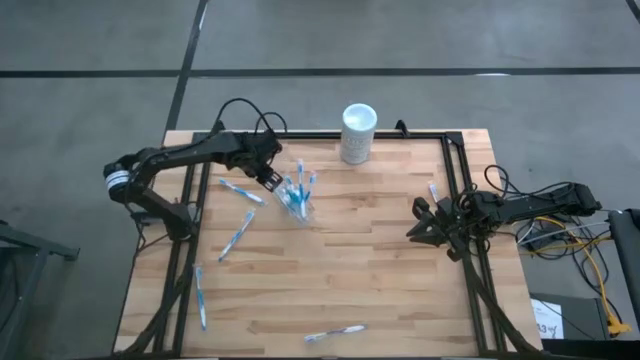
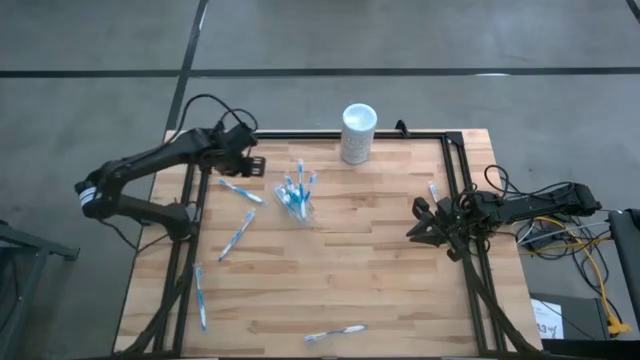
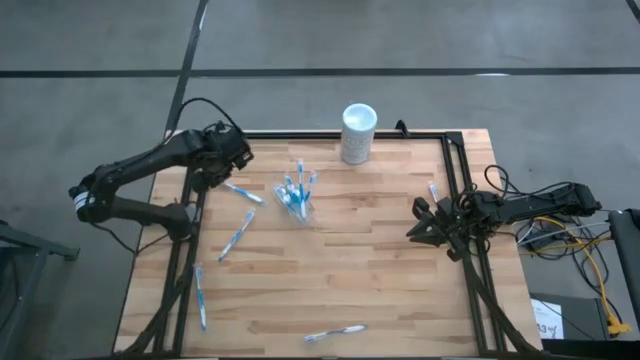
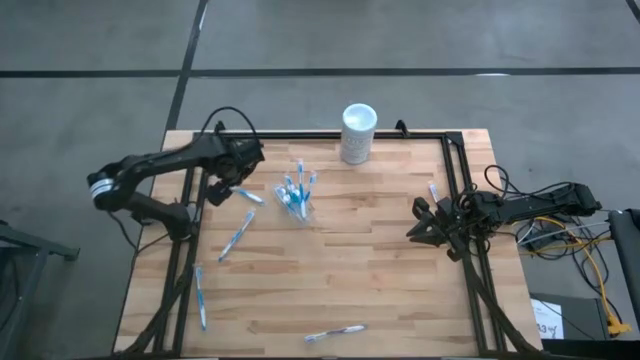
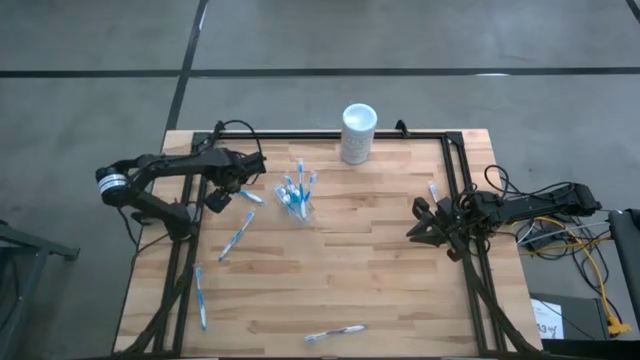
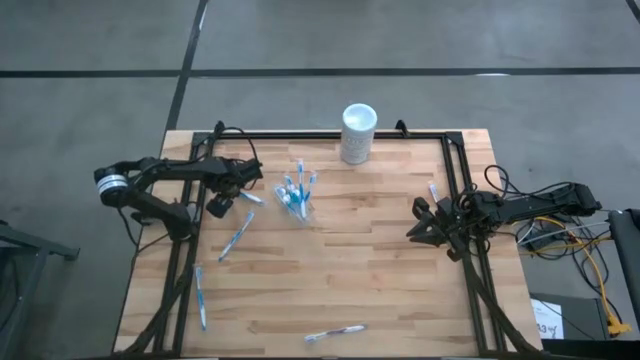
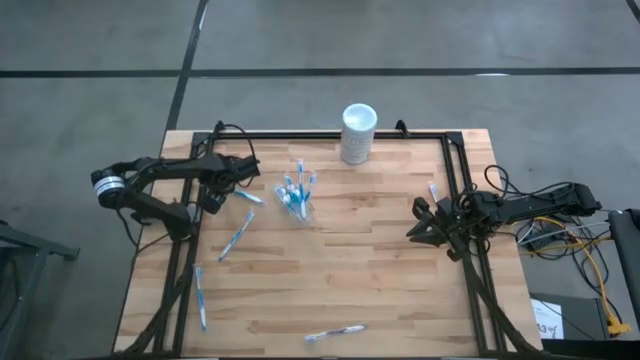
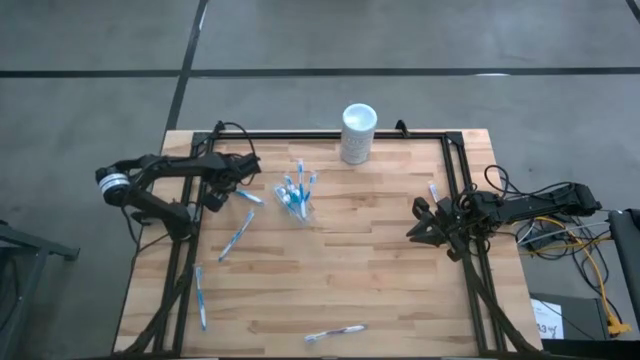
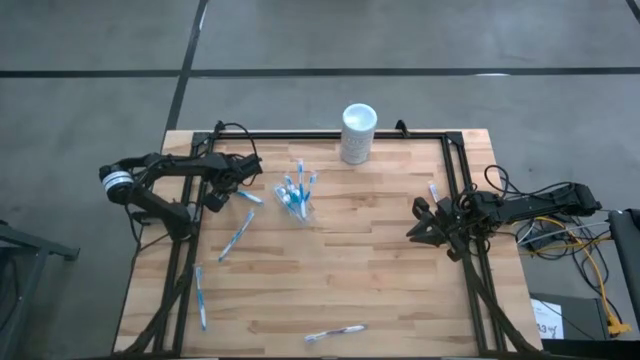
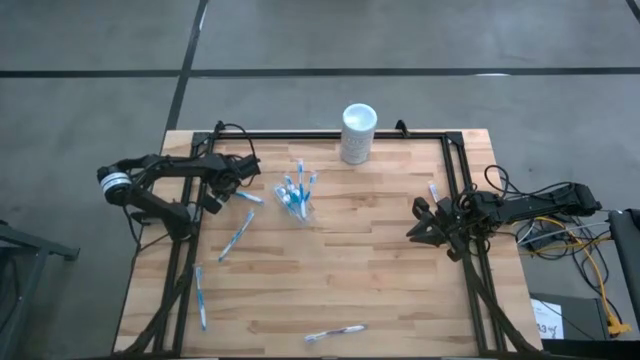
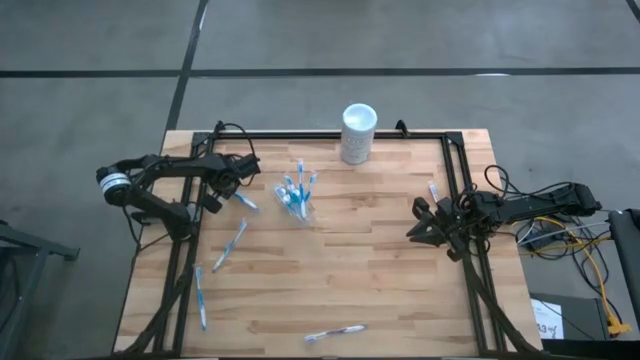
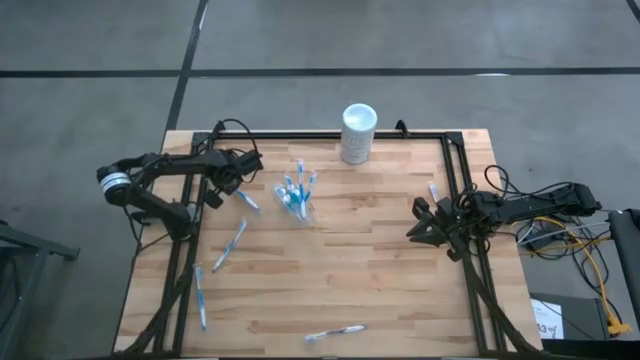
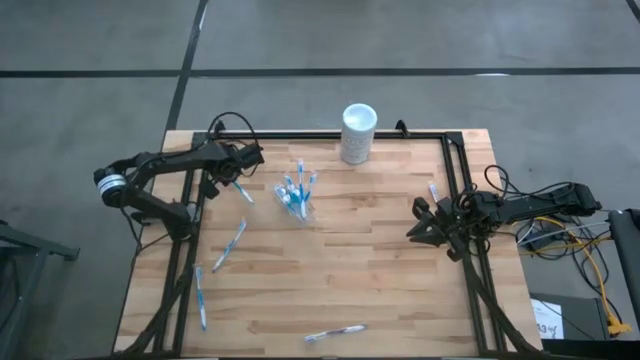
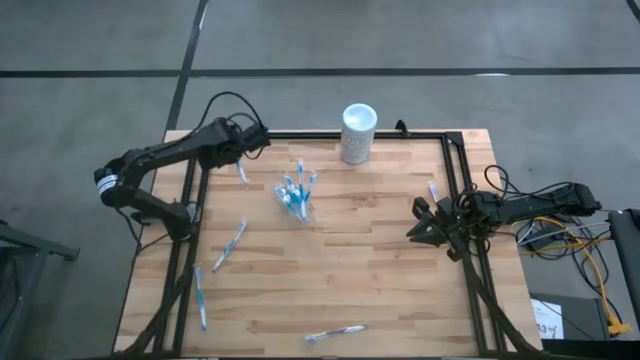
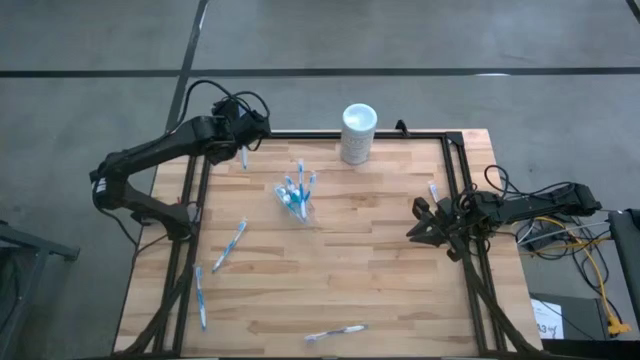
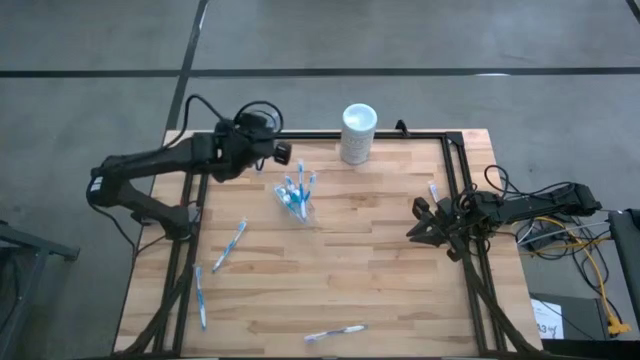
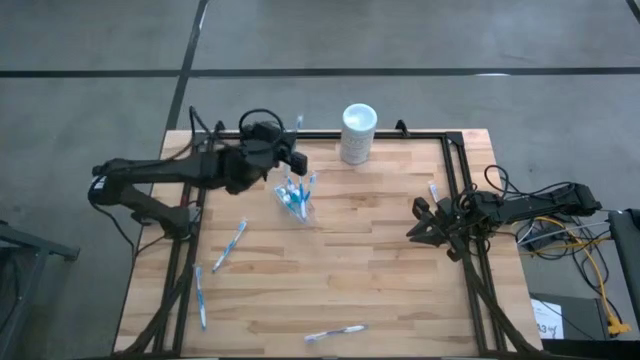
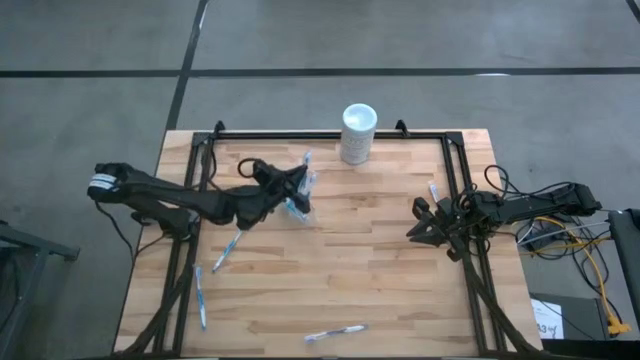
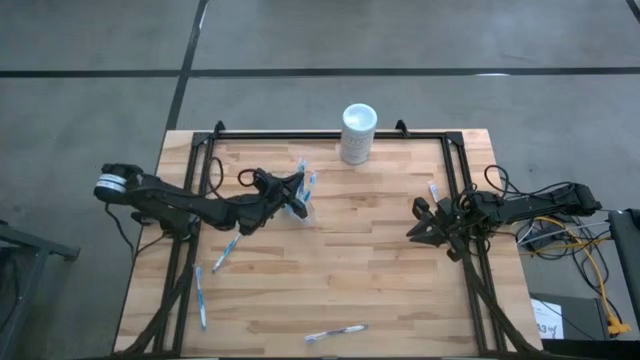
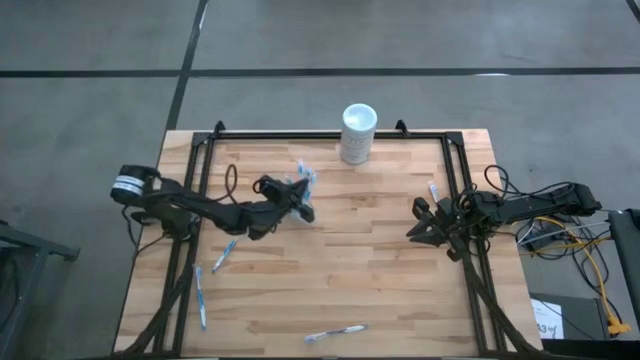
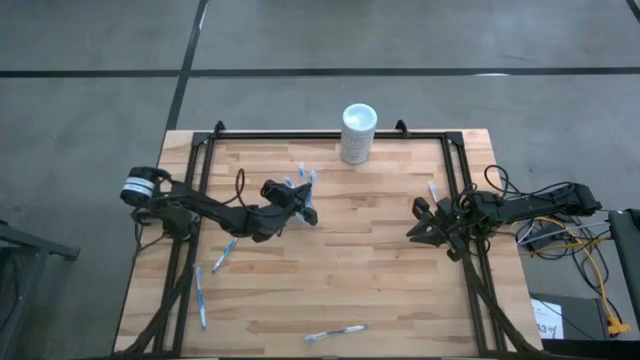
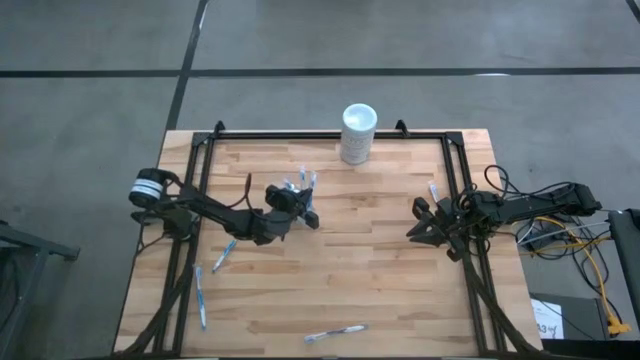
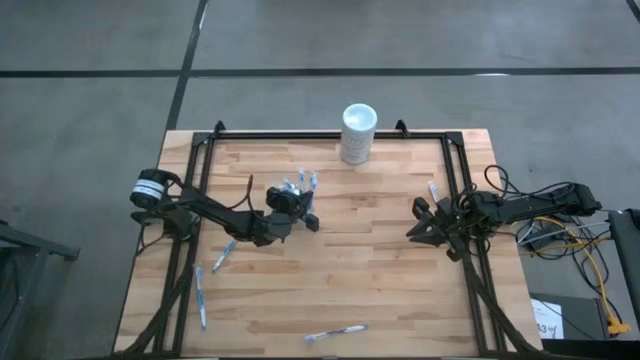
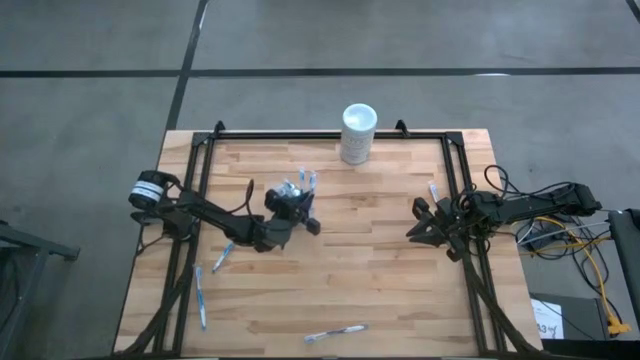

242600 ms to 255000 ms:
Task: Pick & Place toothbrushing station
Put the blue toothbrush into the transparent organizer

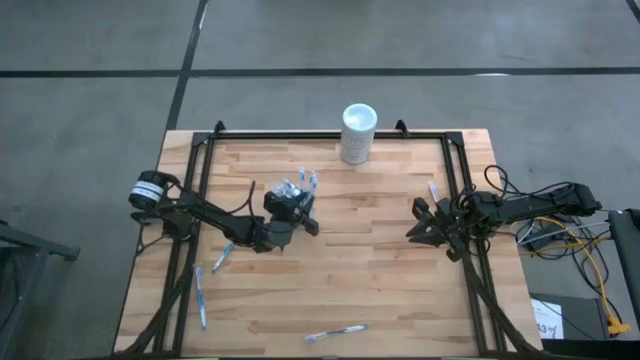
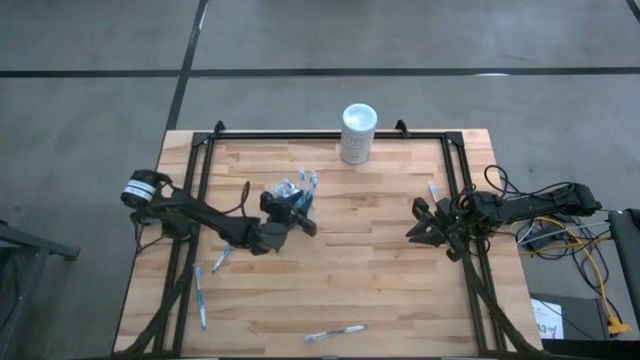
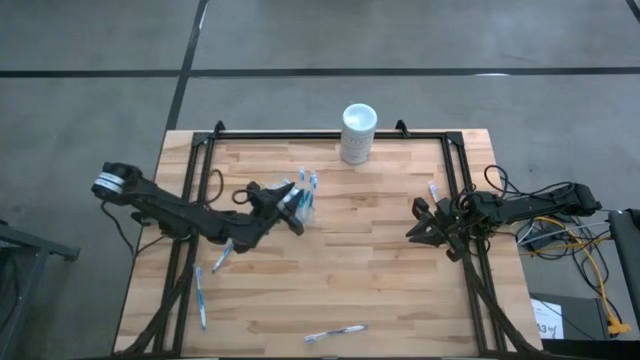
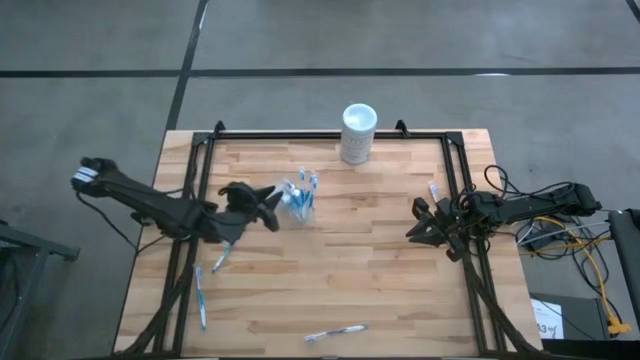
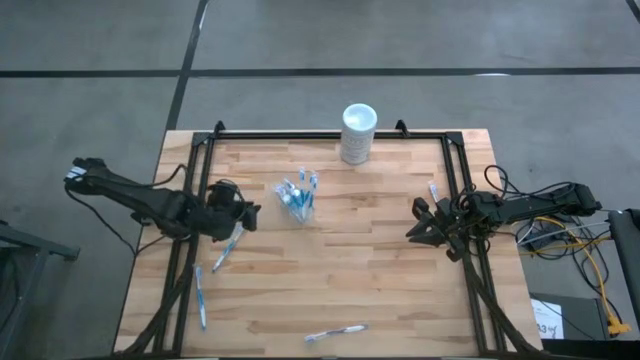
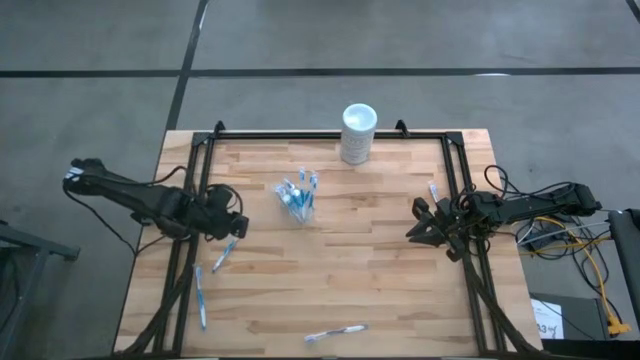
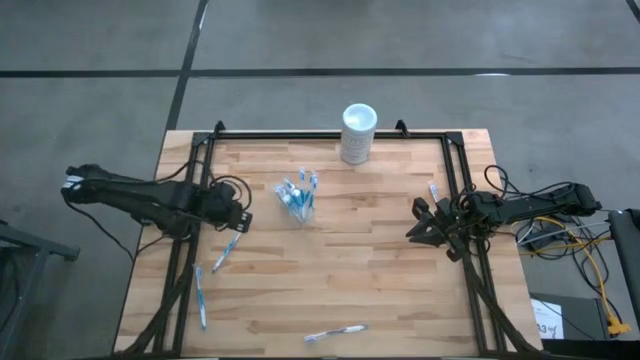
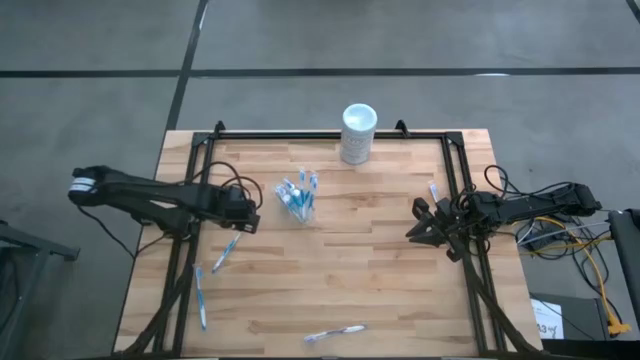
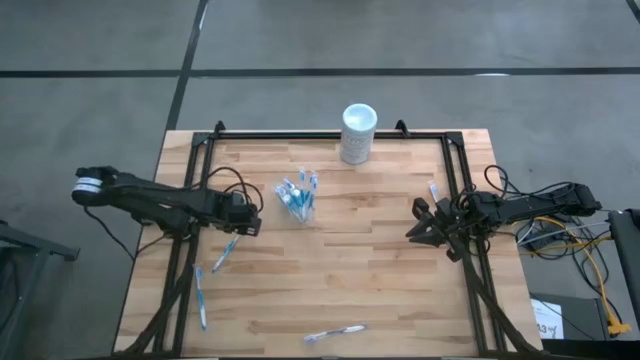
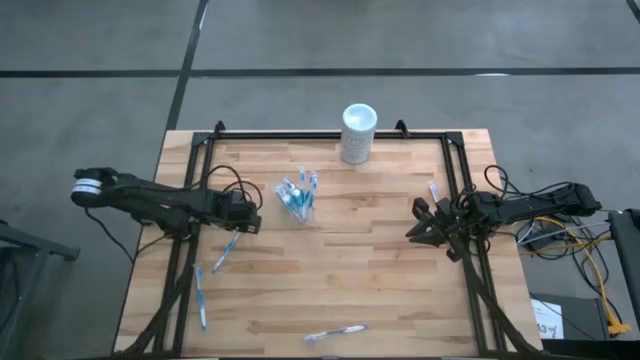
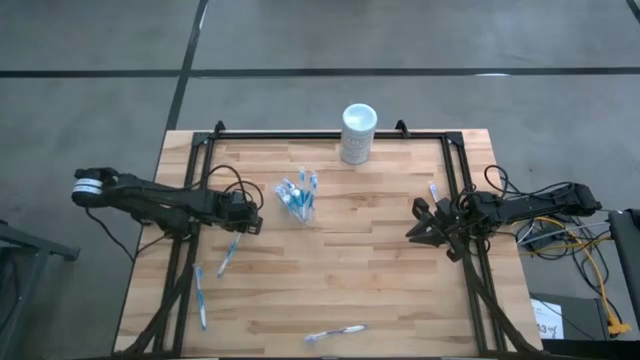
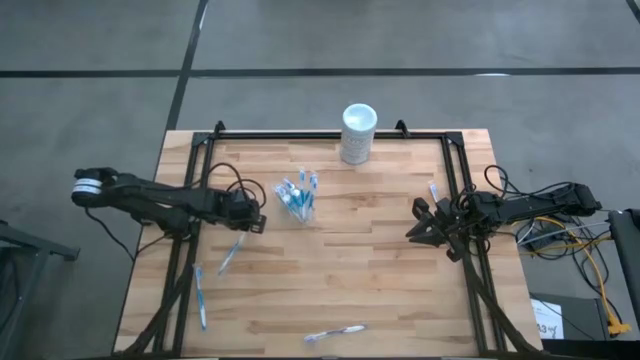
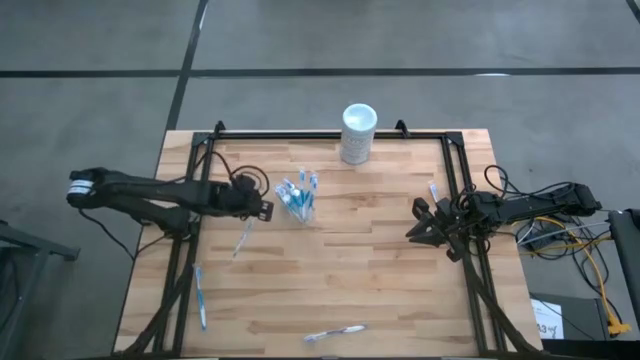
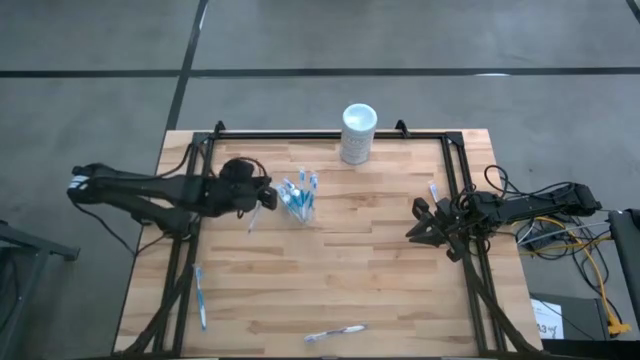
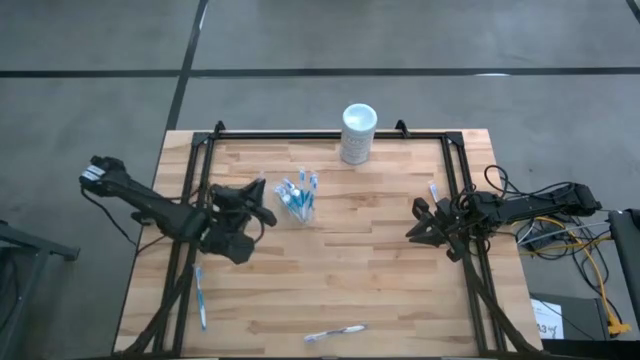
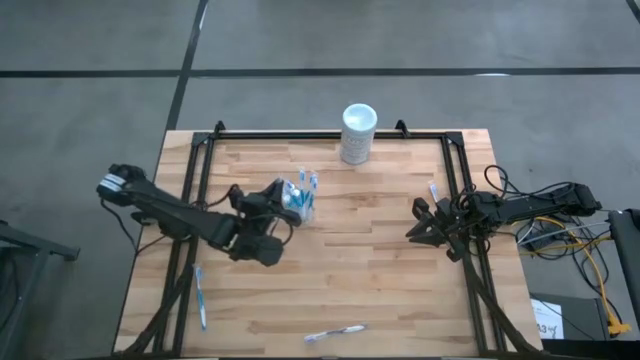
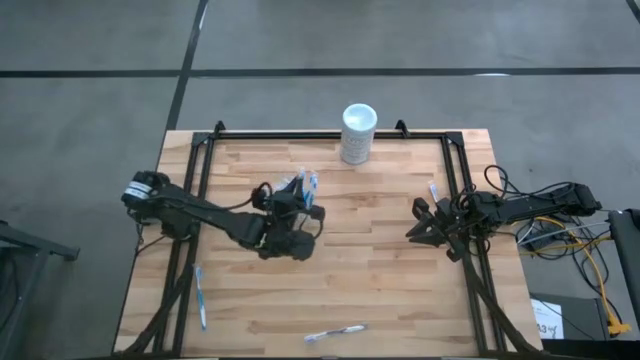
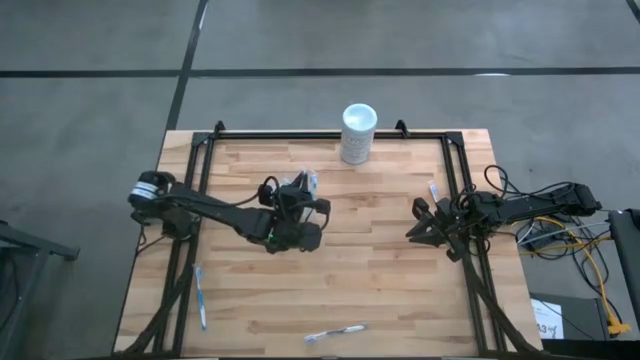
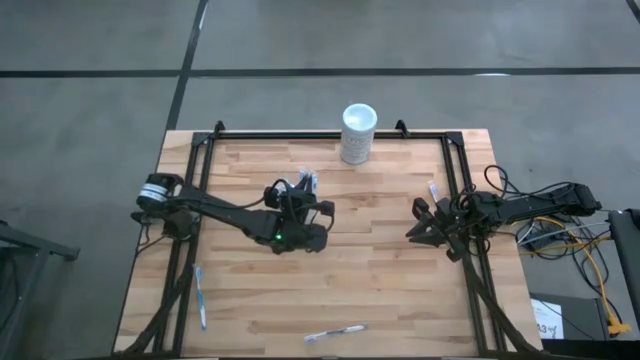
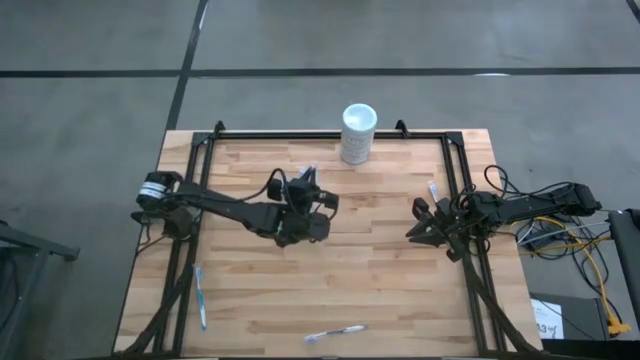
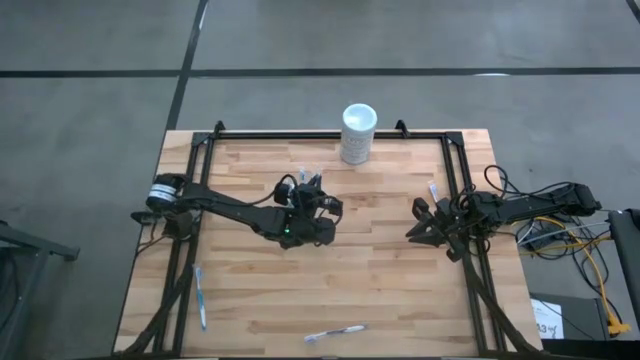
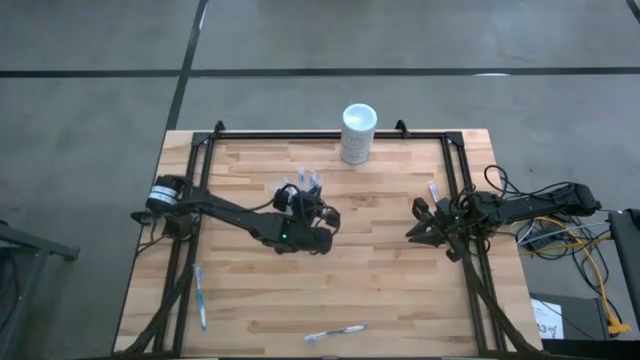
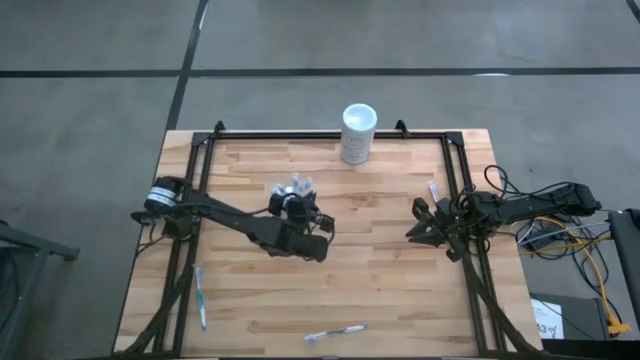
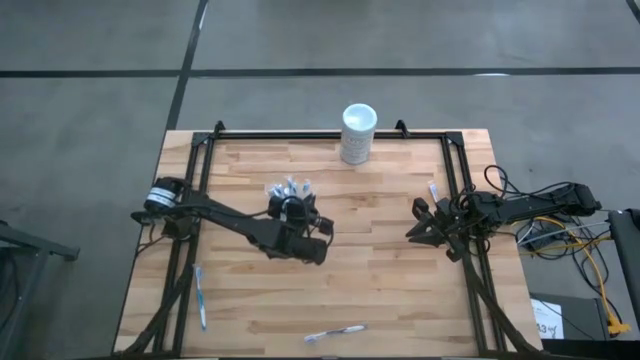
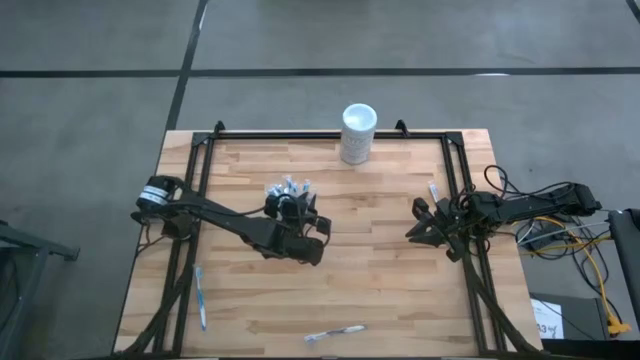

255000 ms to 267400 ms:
Put the blue toothbrush into the transparent organizer
